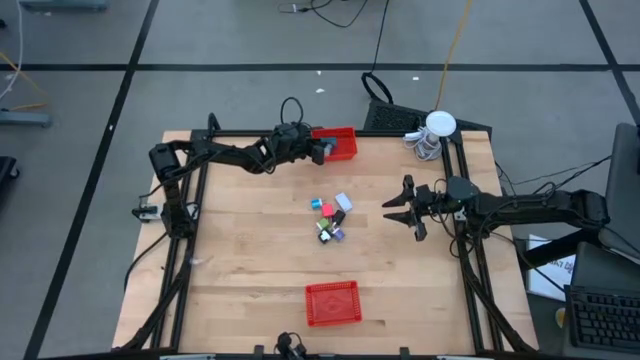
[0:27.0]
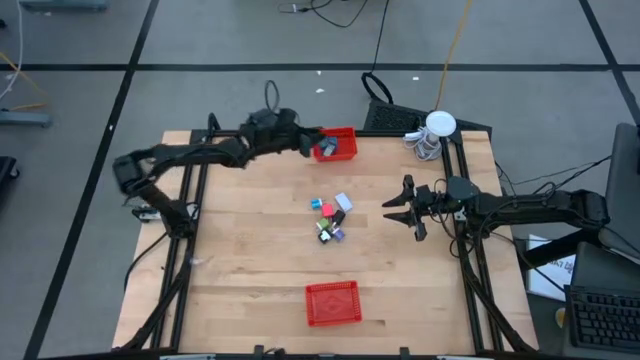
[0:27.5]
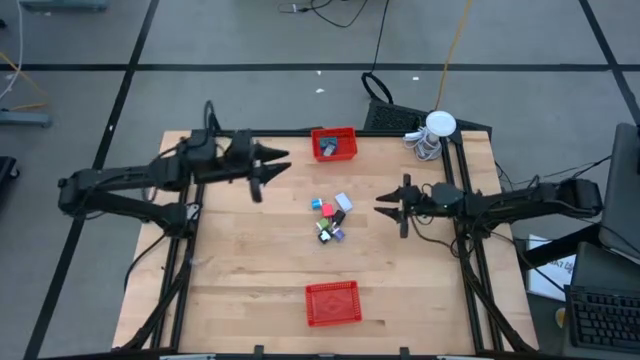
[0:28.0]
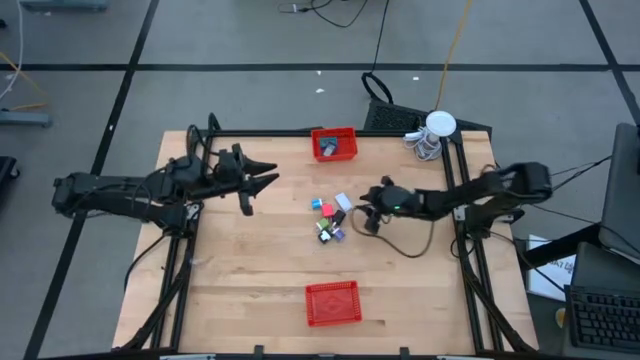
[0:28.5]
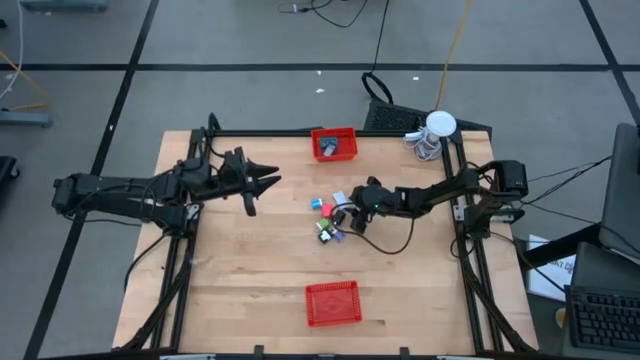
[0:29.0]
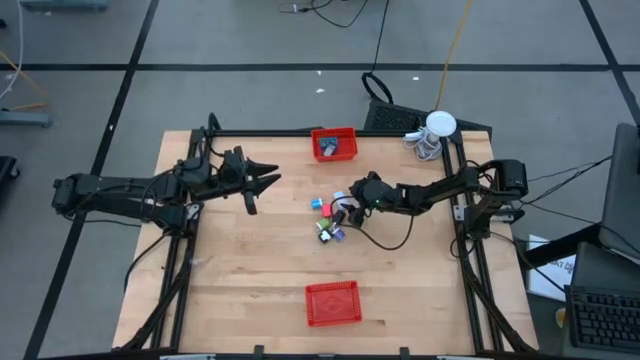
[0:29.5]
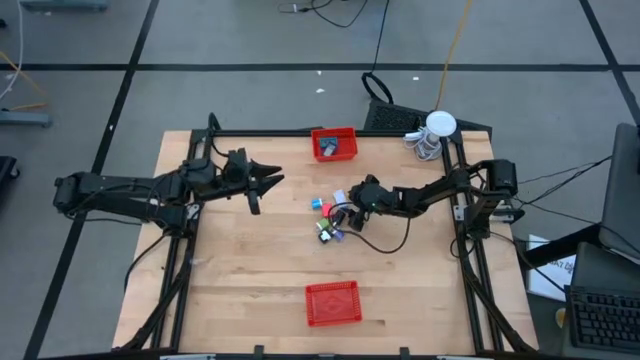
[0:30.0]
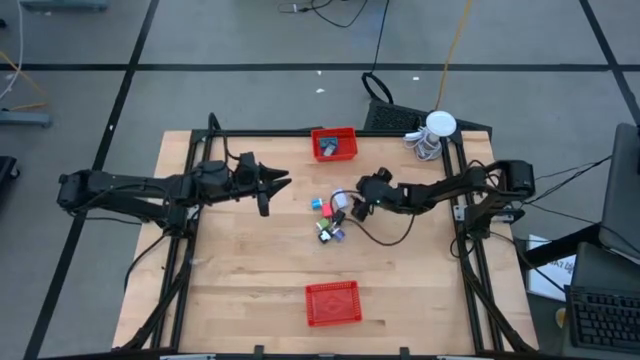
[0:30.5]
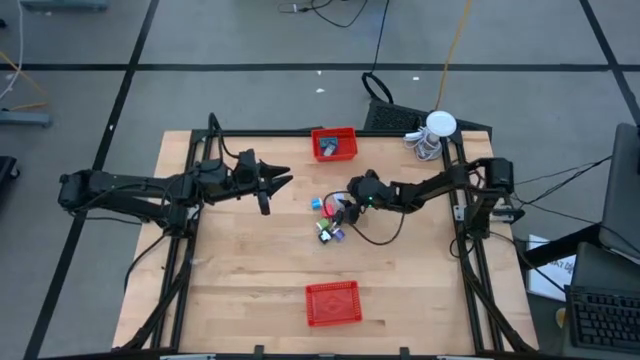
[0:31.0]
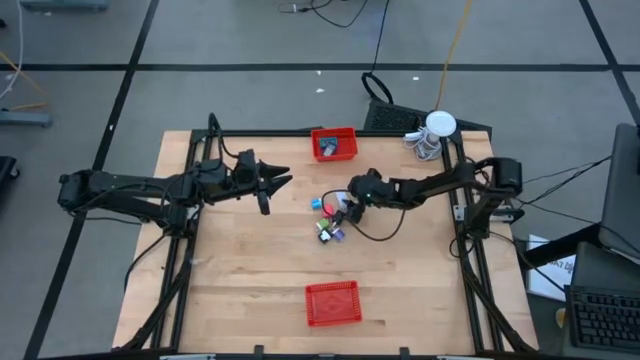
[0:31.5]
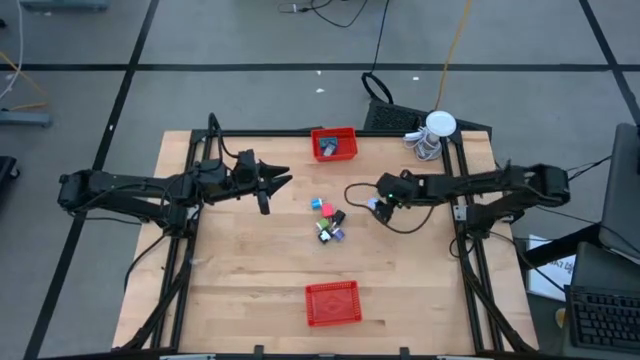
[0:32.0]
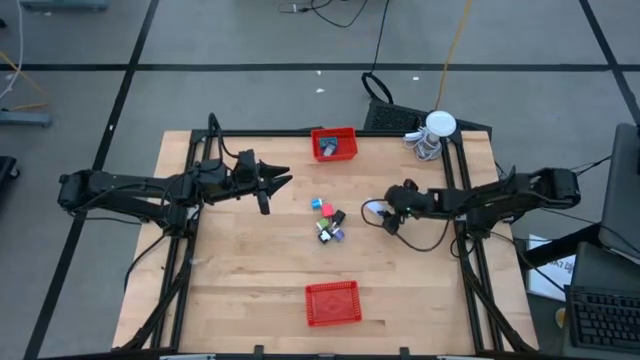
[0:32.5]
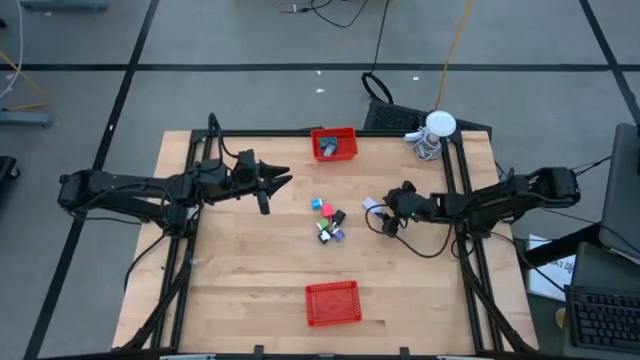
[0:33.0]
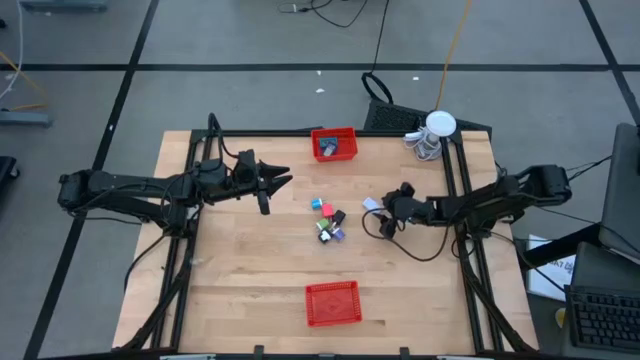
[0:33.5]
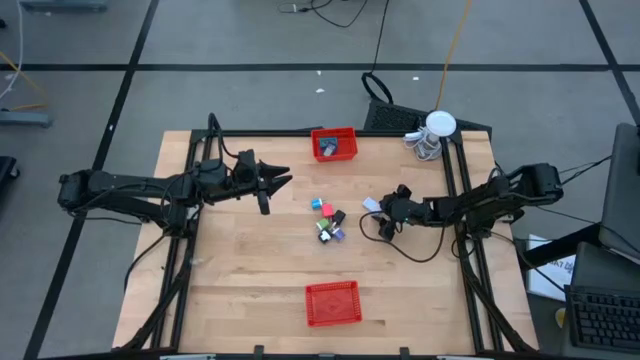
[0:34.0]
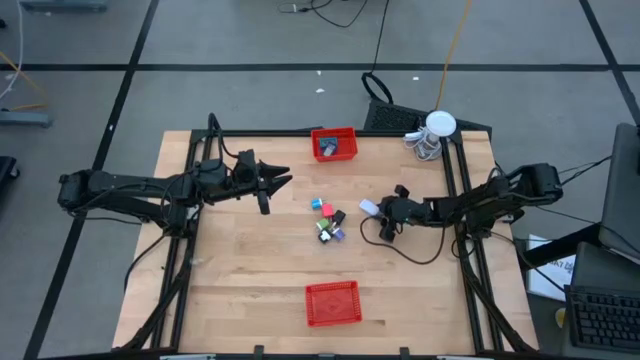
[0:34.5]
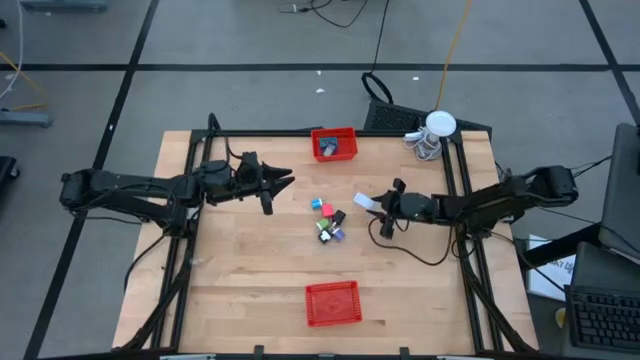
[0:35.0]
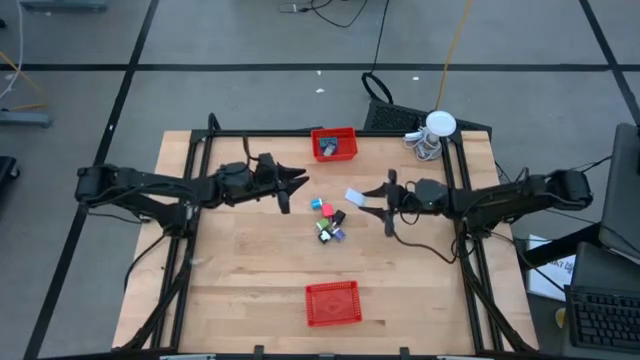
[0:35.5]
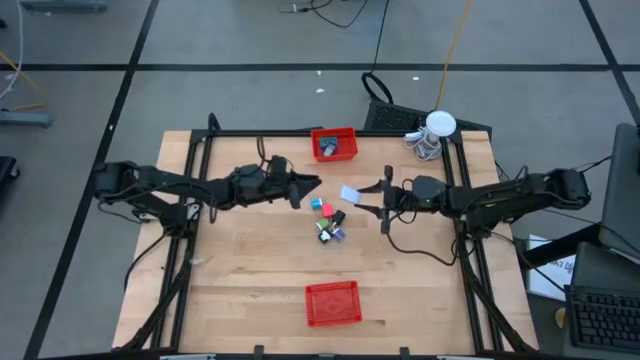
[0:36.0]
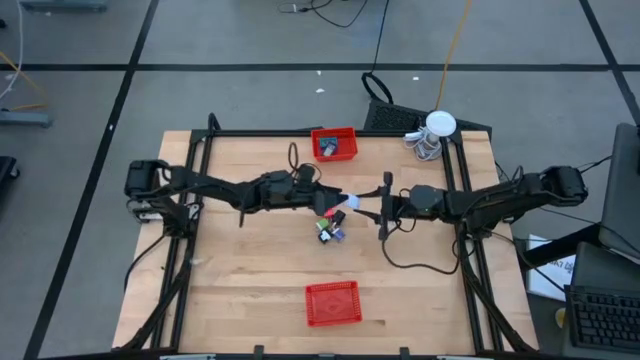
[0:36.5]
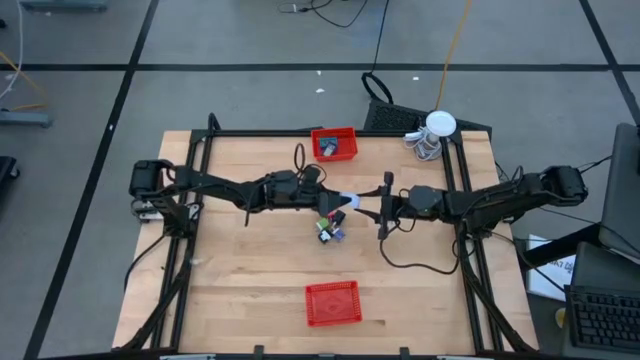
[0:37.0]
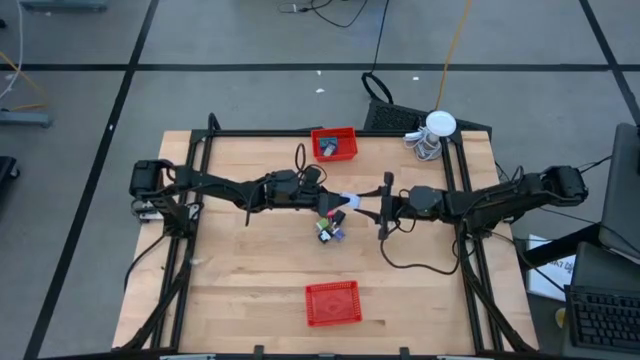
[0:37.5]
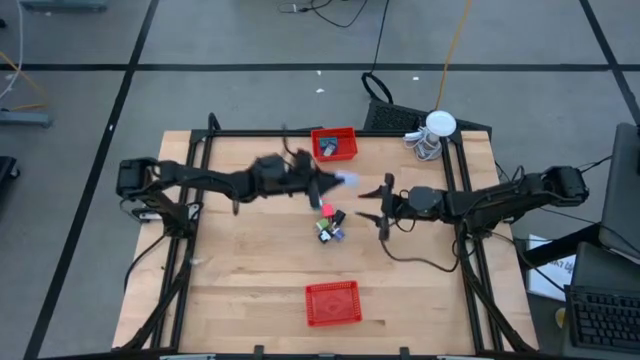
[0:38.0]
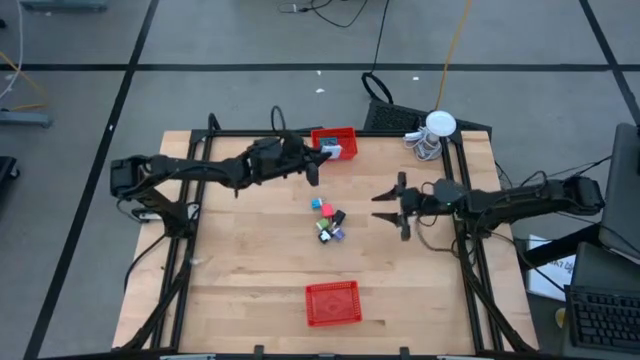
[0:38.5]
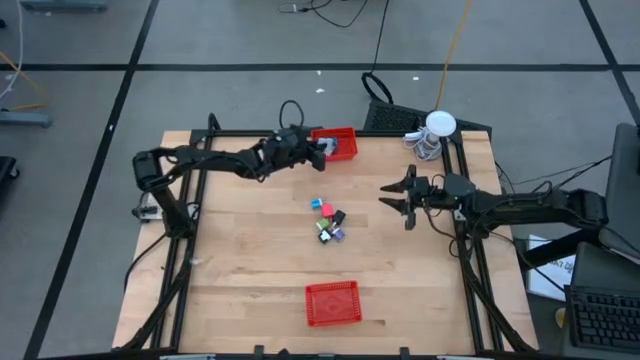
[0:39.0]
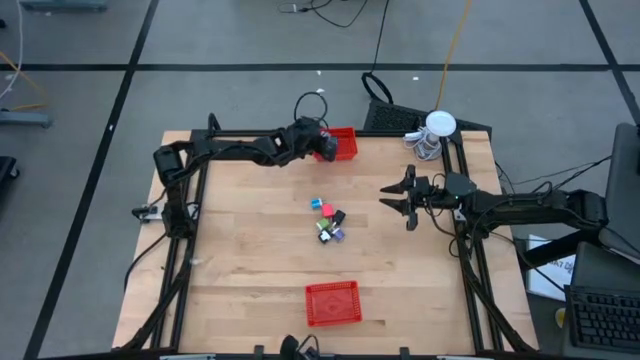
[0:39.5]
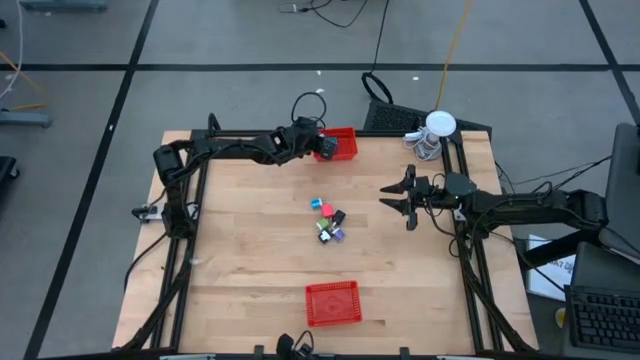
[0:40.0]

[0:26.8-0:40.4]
Task: Pick & Place Office items
Put the white timer into the top orange bin

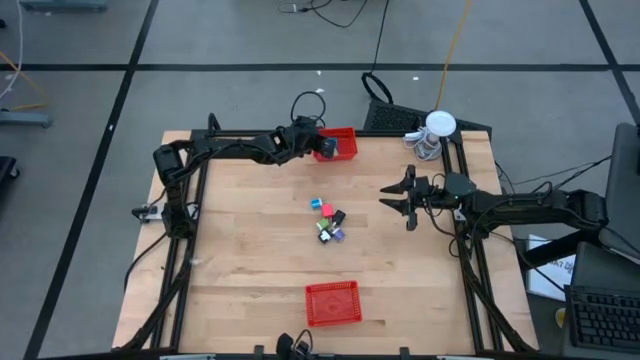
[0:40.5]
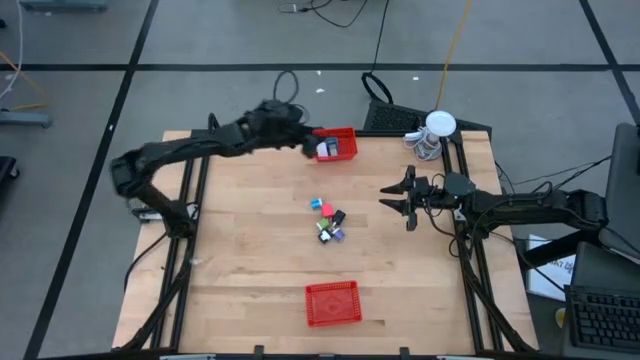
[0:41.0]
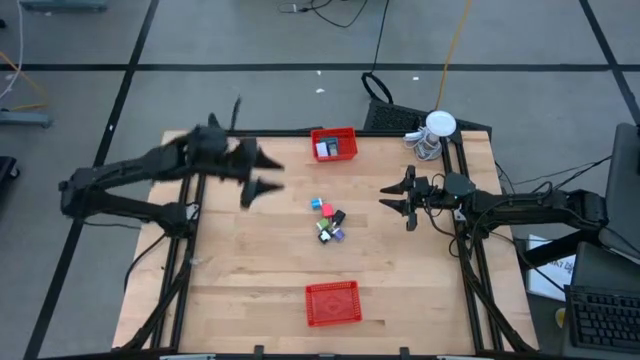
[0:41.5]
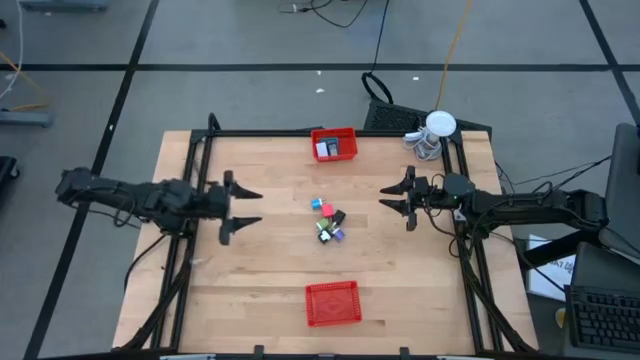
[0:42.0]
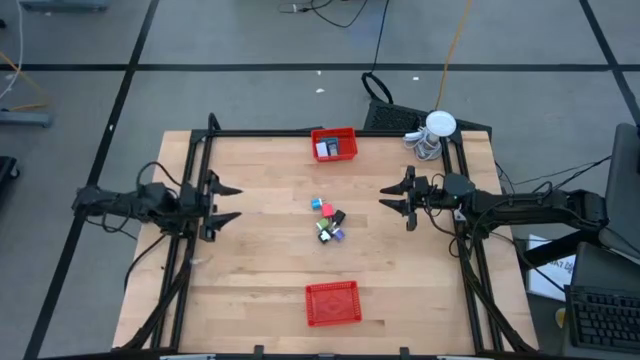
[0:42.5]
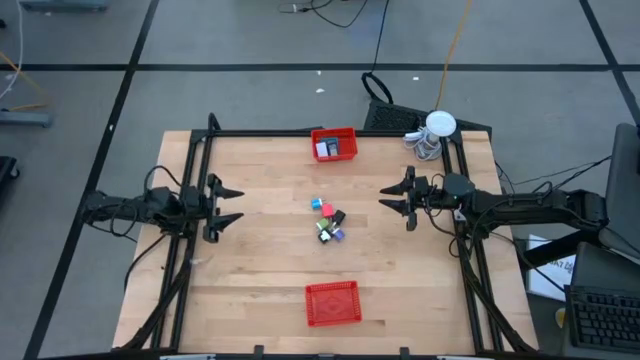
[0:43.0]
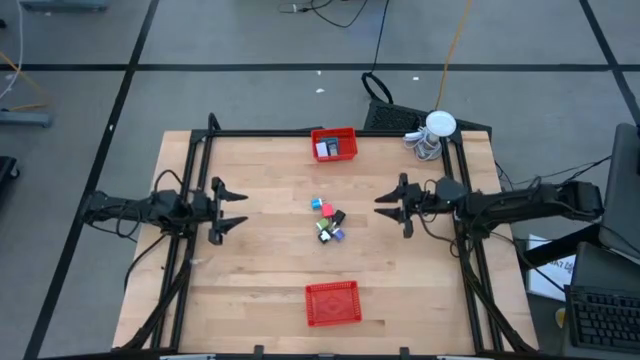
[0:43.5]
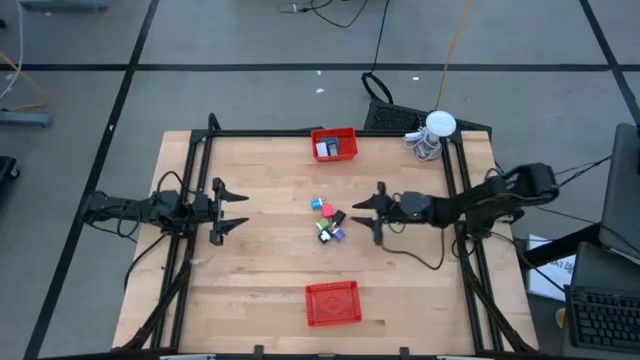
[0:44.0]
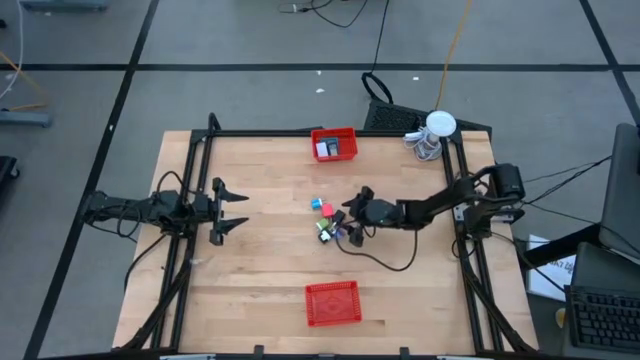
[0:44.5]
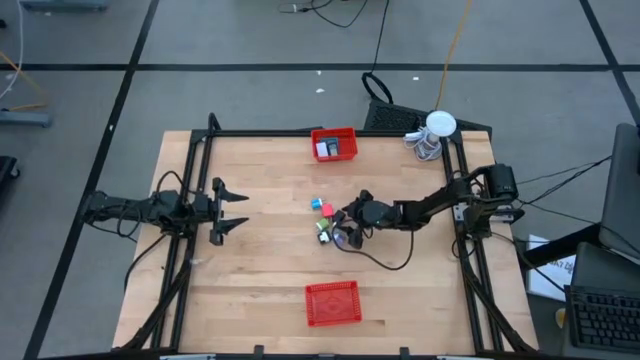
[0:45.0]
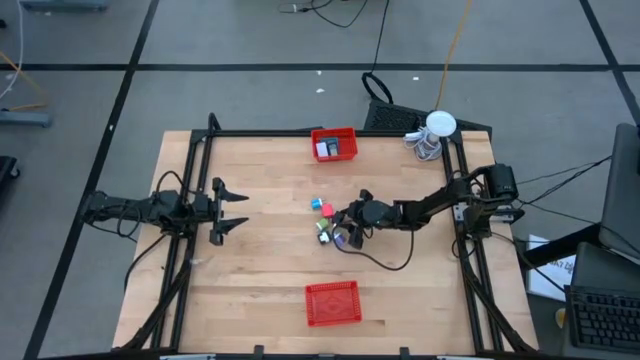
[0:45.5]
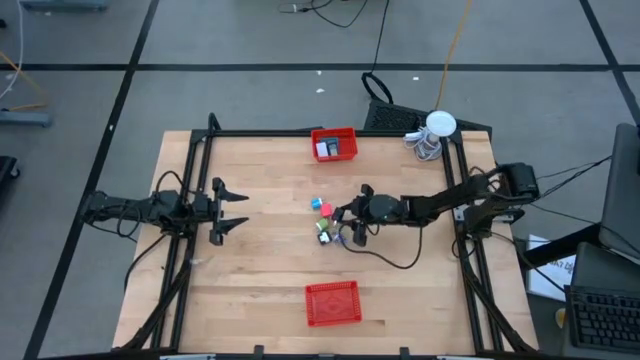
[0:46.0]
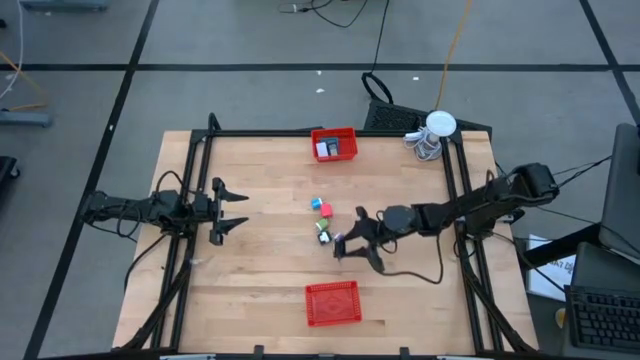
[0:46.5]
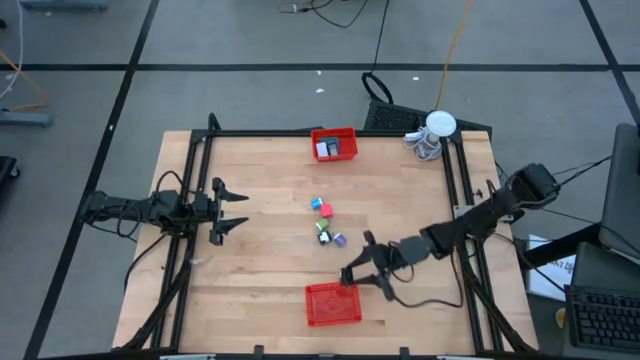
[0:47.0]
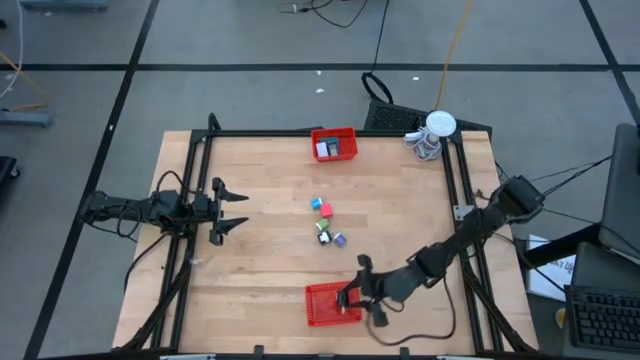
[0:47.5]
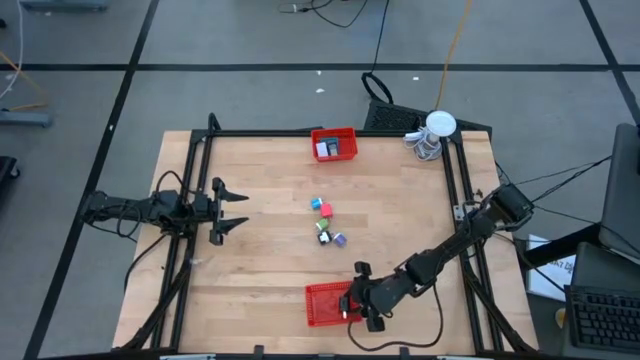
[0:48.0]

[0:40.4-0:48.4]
Put the black charger adapter into the bottom orange bin
